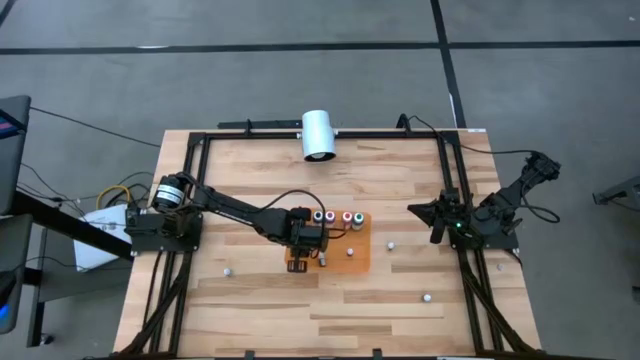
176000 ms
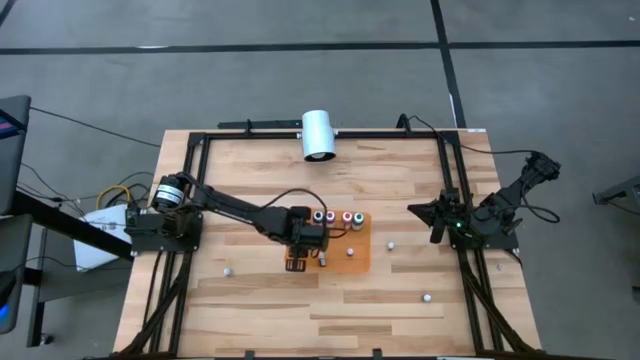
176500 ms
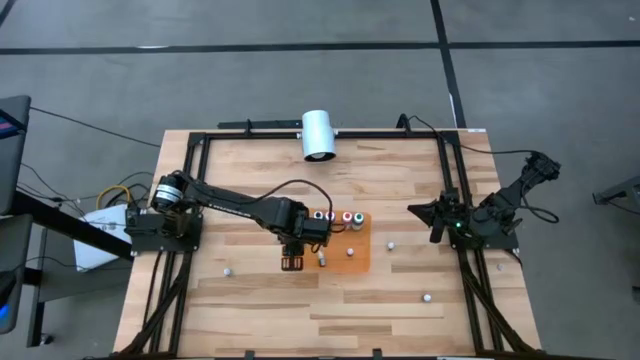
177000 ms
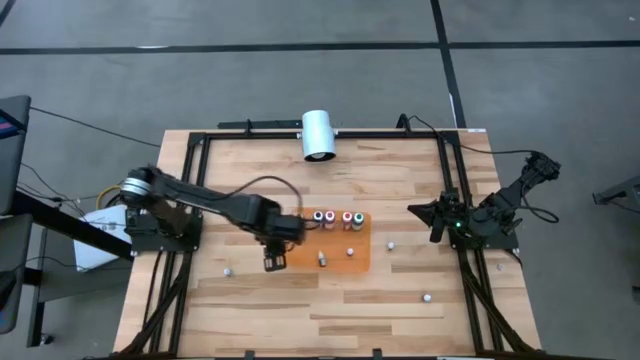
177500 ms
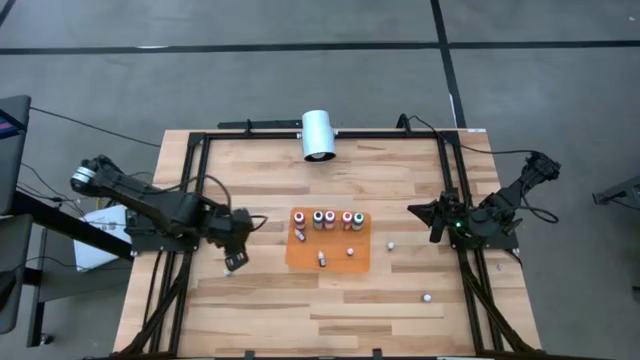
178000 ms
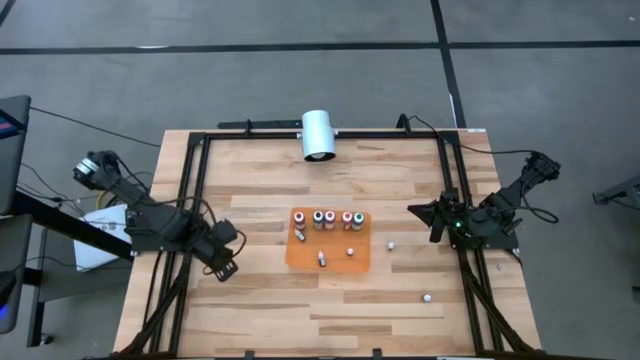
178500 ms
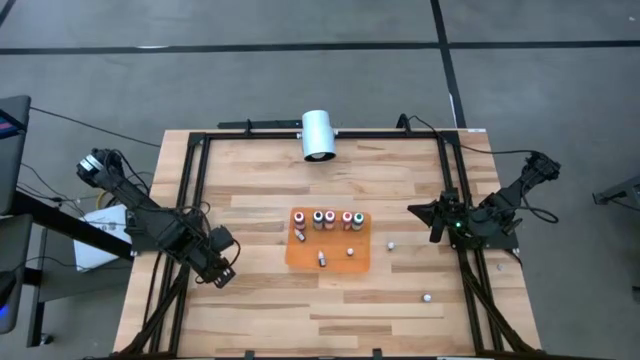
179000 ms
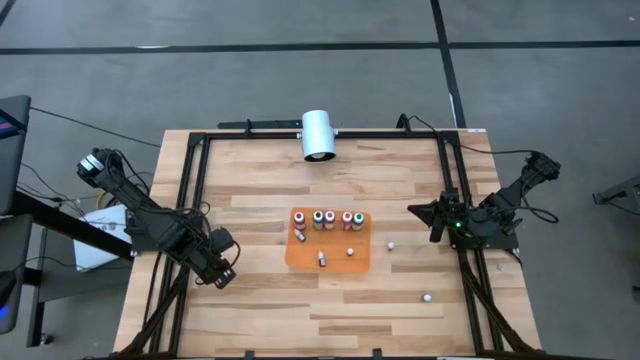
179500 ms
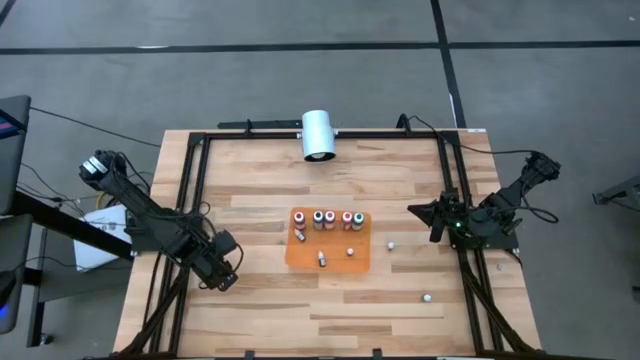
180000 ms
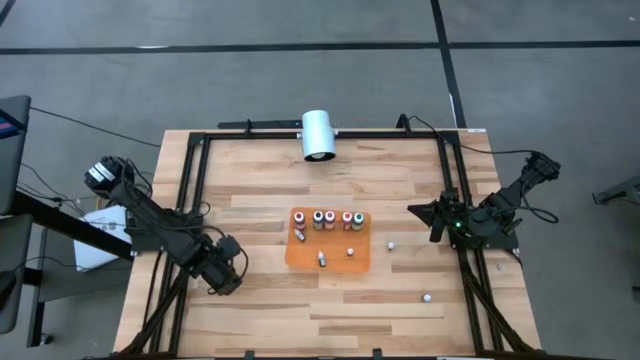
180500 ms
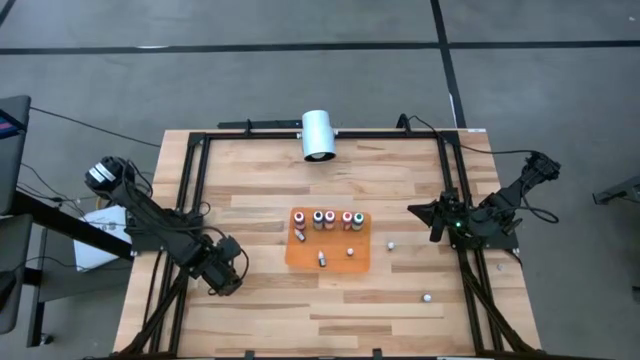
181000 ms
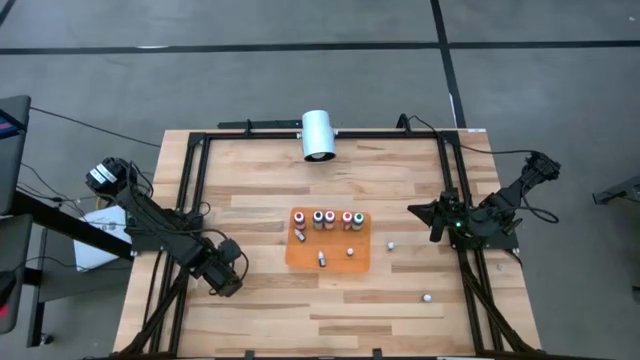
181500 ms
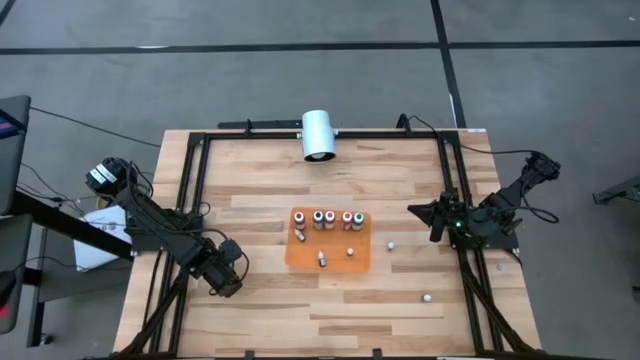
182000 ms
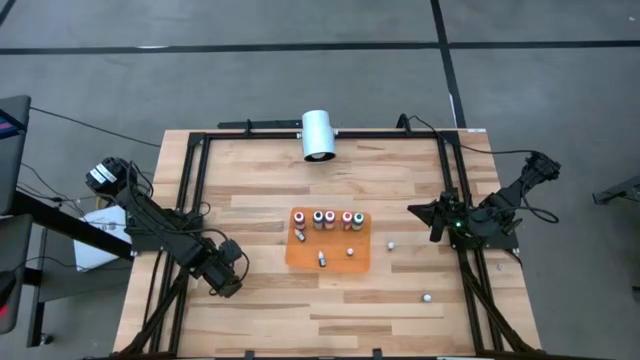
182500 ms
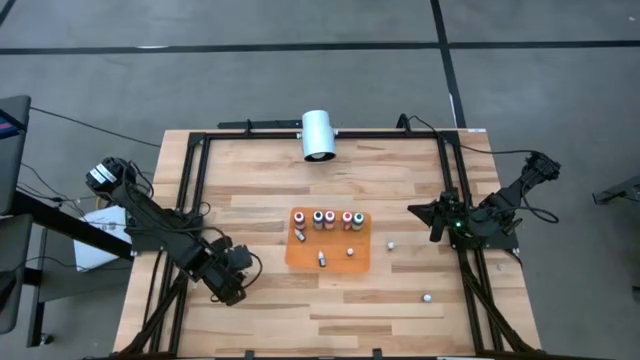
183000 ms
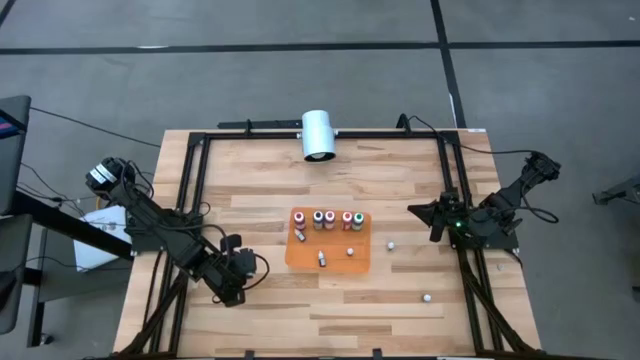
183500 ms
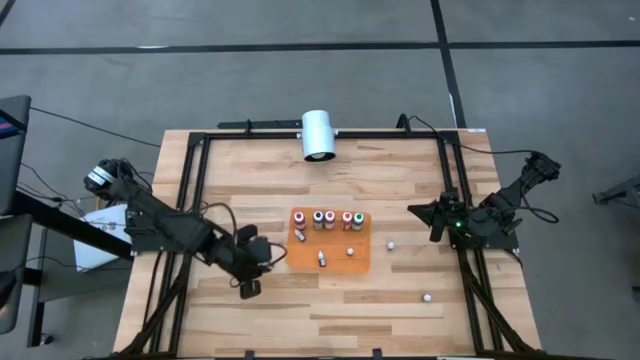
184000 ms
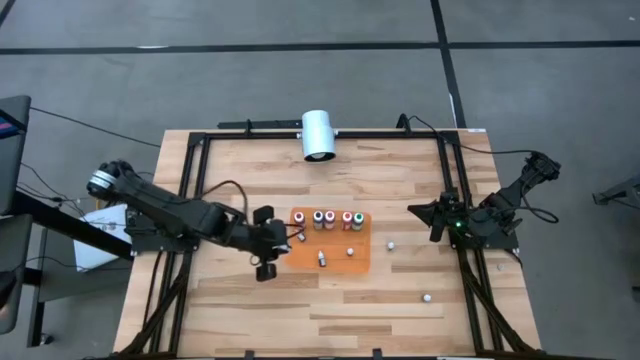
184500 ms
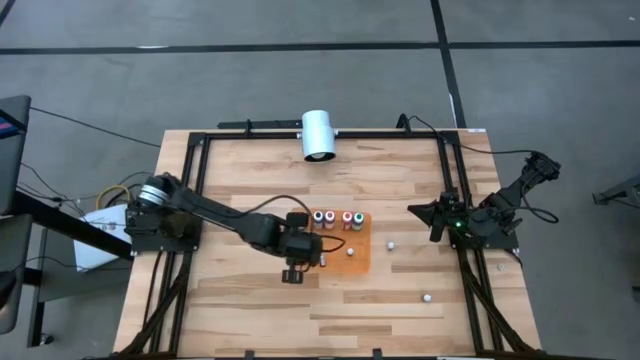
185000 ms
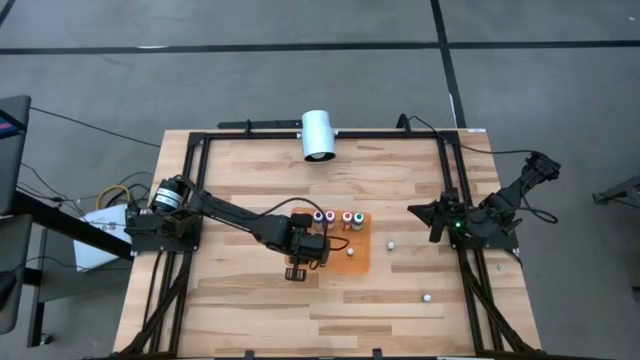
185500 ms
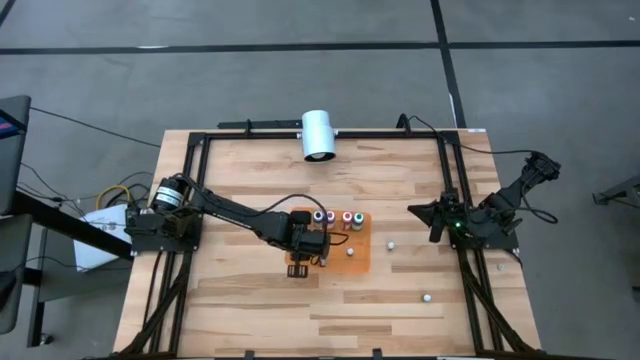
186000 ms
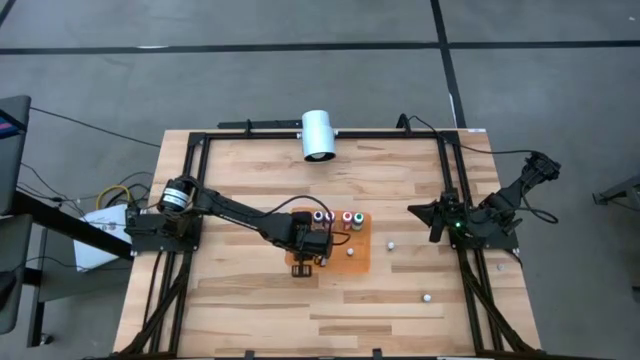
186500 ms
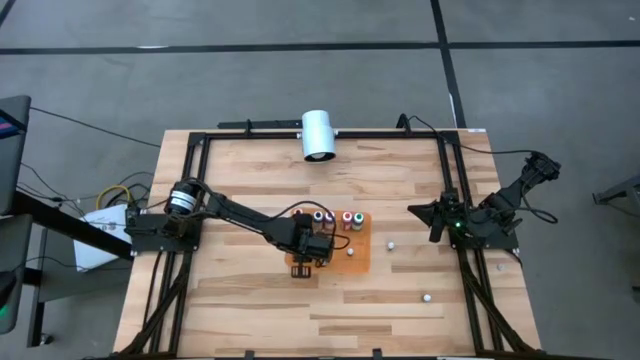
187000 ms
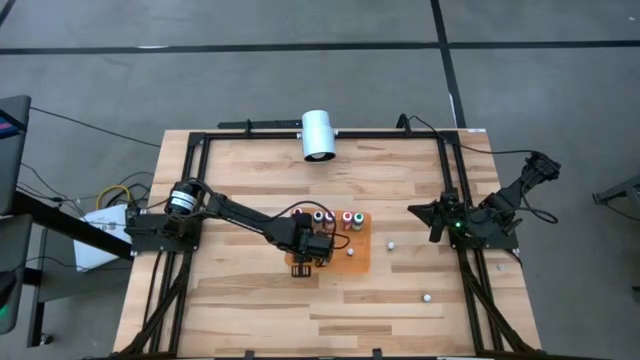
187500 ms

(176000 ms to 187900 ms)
Task: Pick & Place food coloring
Put the small black food coloring into the orange bin

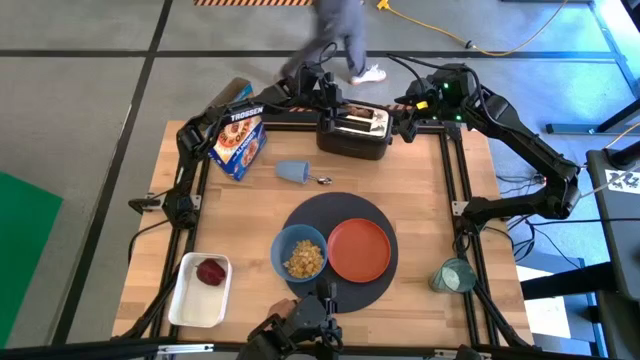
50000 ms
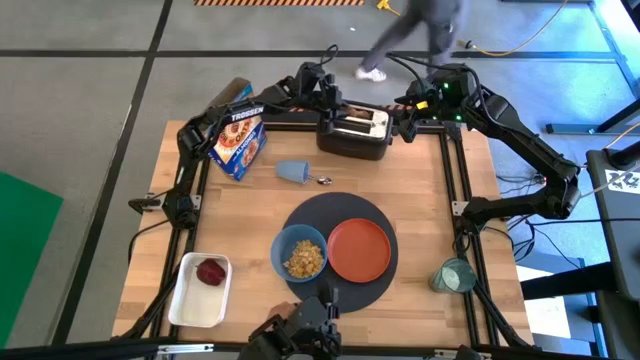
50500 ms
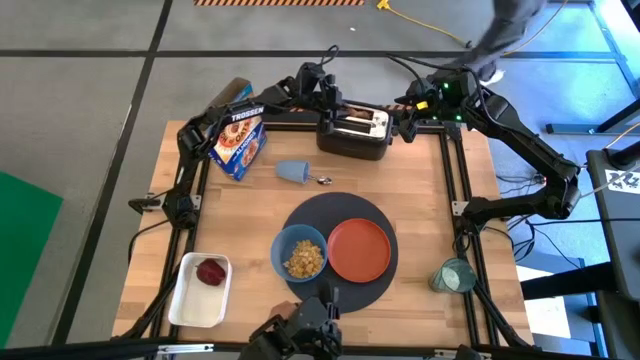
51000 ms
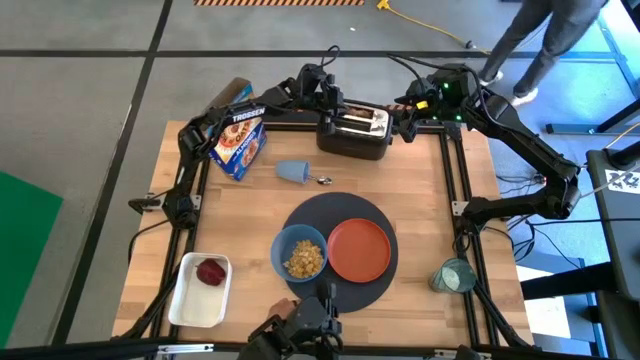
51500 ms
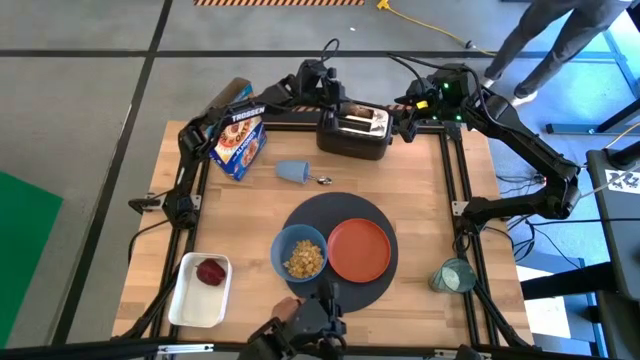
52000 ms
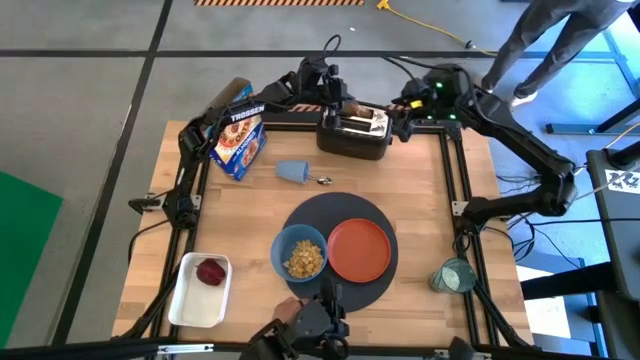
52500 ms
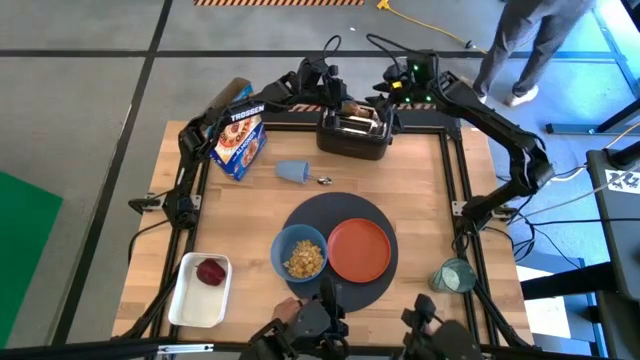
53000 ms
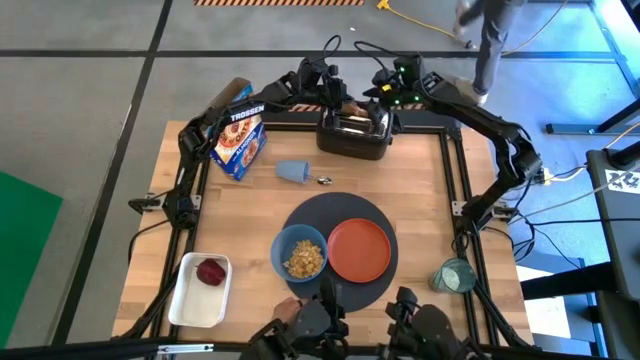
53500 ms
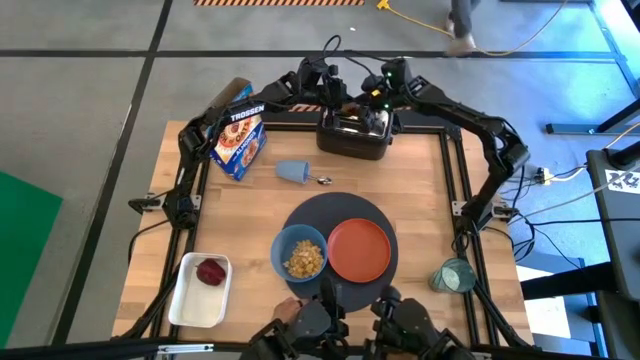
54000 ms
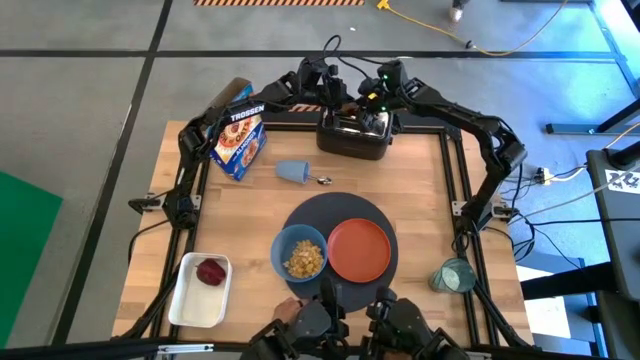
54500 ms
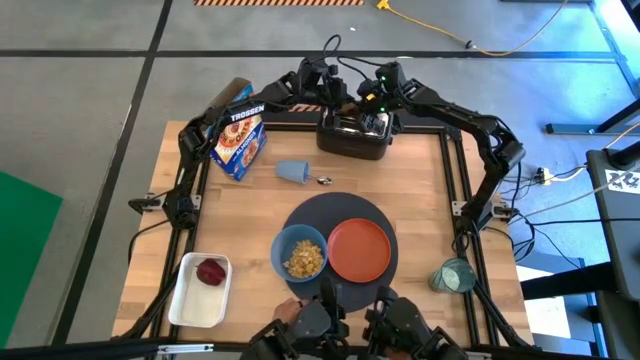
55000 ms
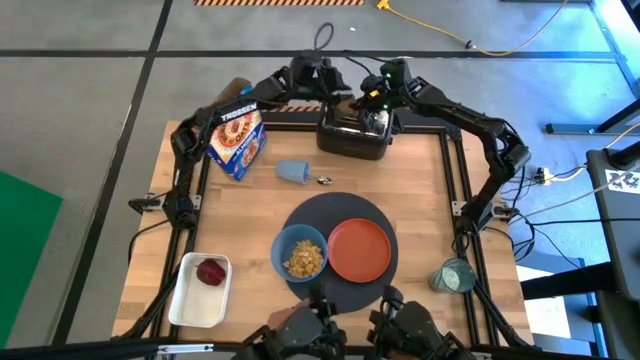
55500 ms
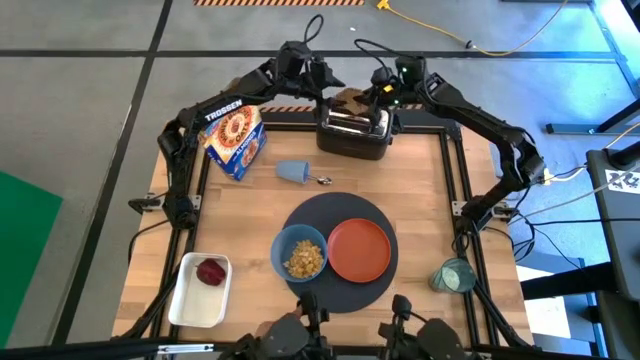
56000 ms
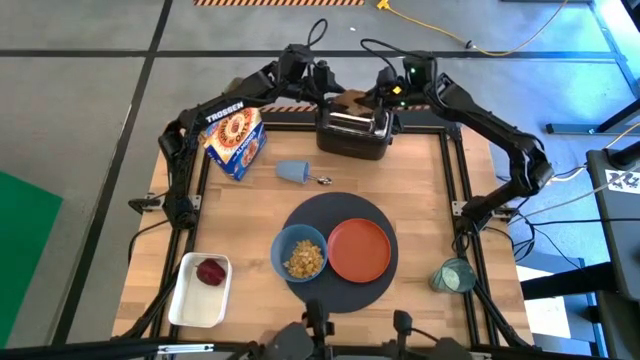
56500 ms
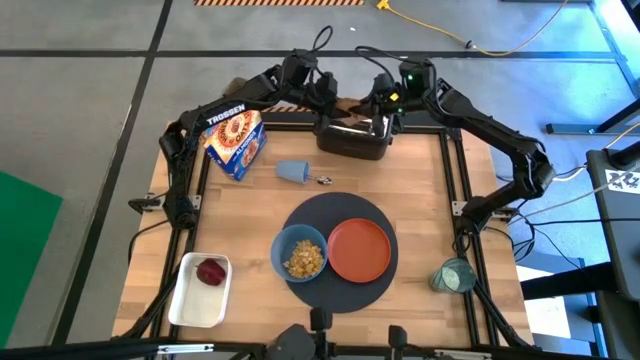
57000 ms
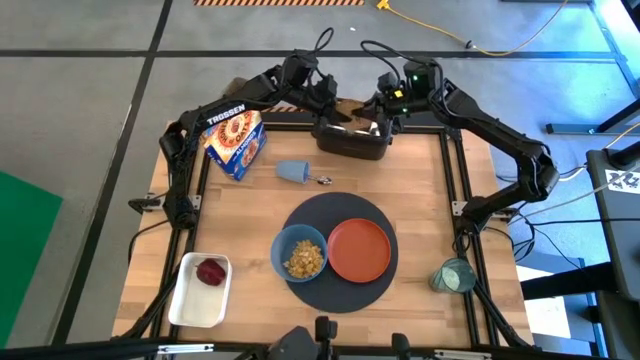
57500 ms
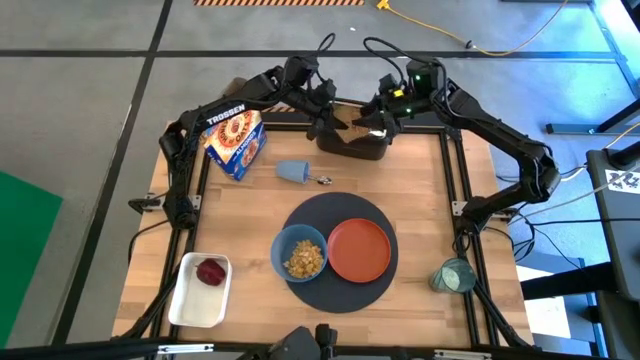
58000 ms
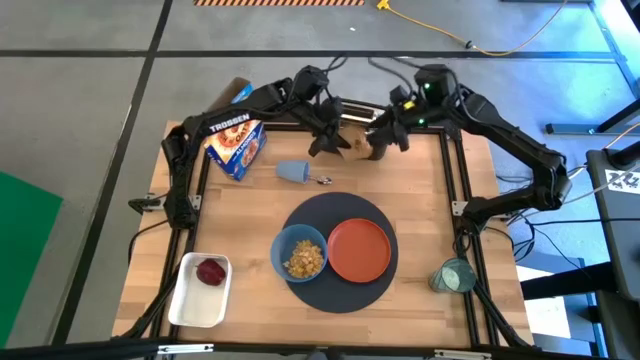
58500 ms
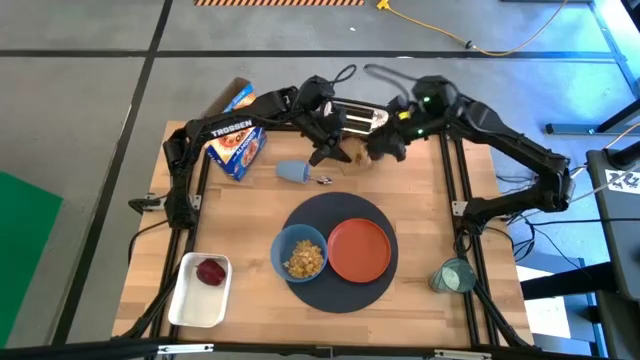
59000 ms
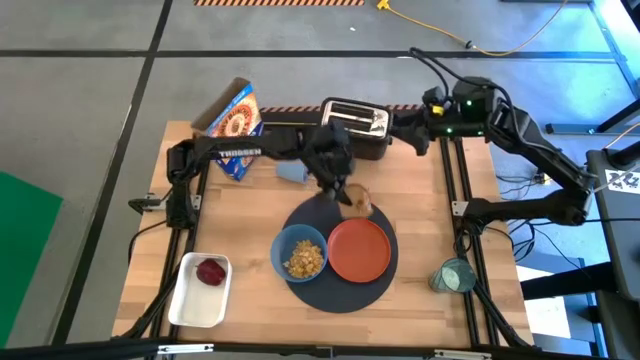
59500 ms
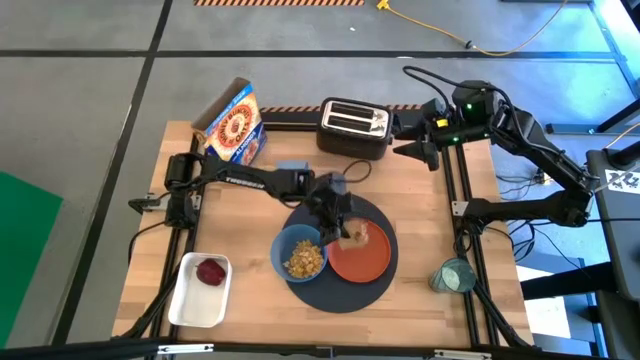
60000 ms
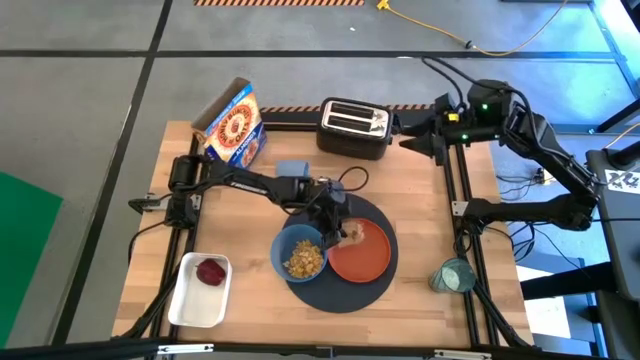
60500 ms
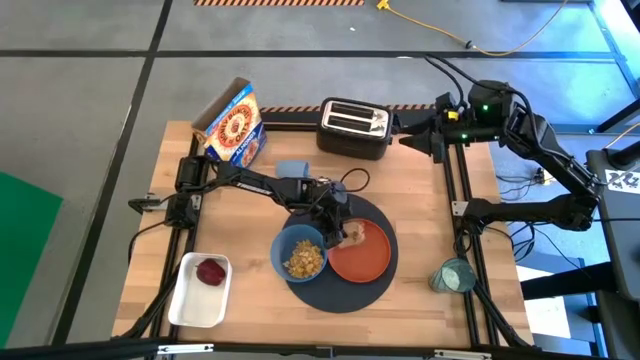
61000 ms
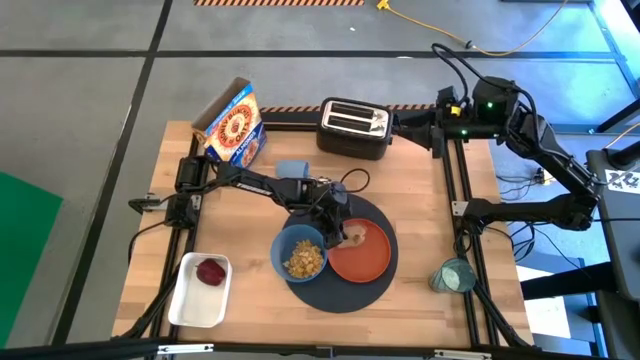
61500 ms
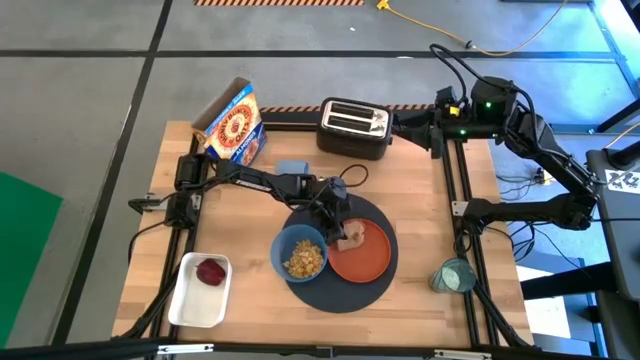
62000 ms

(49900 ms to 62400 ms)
Task: Arrange a breakfast setting
Put the toasted bread from the toaster onto the orange plate
